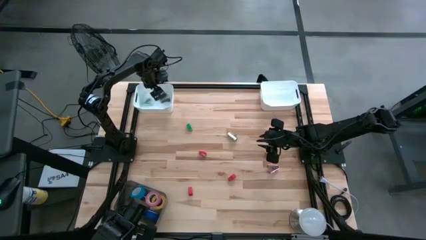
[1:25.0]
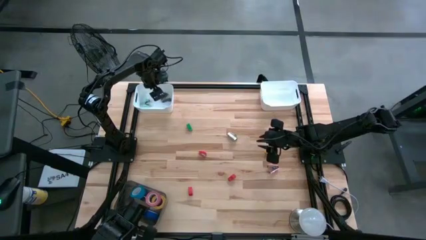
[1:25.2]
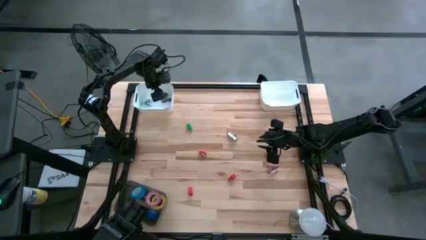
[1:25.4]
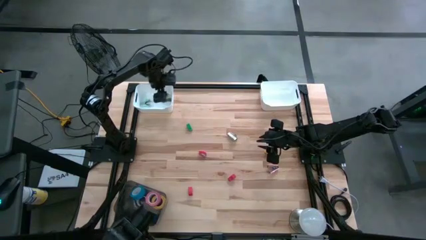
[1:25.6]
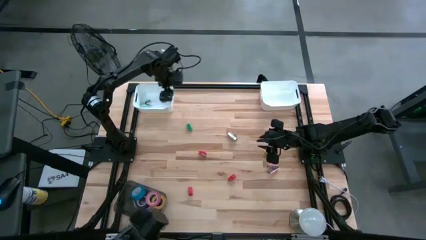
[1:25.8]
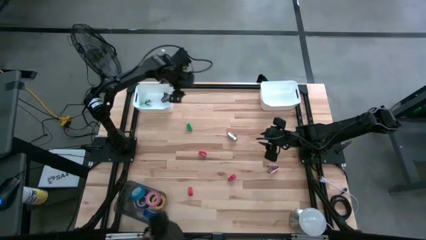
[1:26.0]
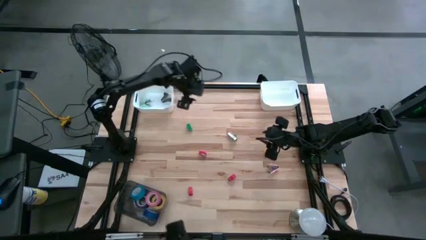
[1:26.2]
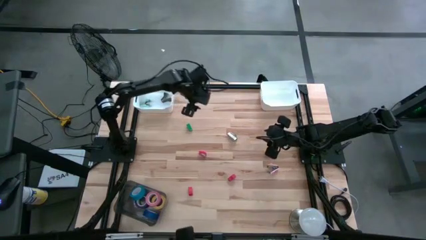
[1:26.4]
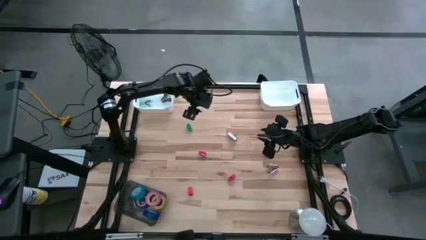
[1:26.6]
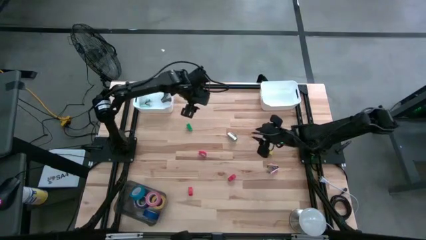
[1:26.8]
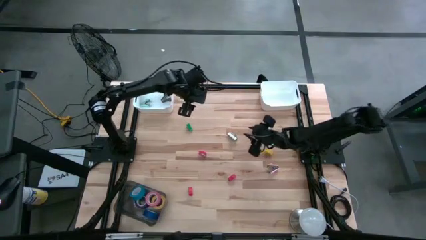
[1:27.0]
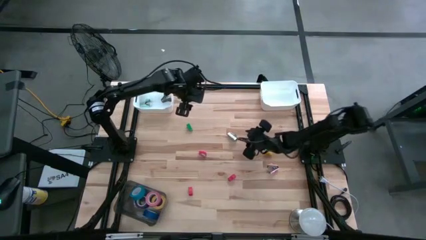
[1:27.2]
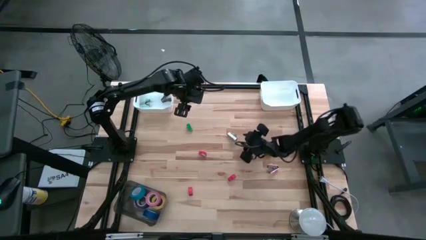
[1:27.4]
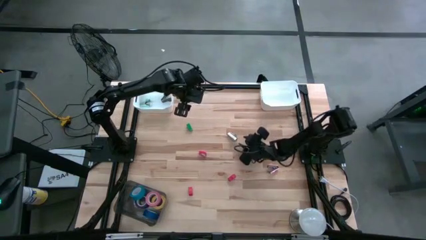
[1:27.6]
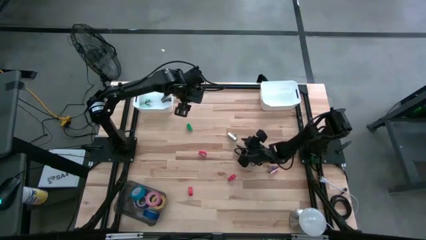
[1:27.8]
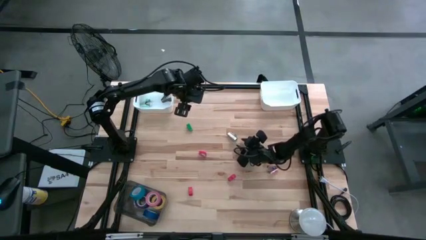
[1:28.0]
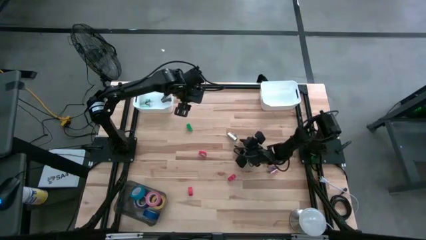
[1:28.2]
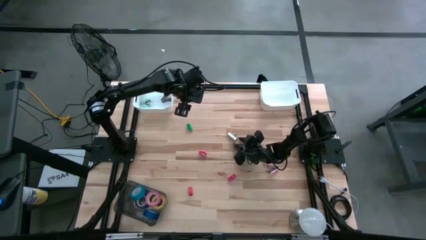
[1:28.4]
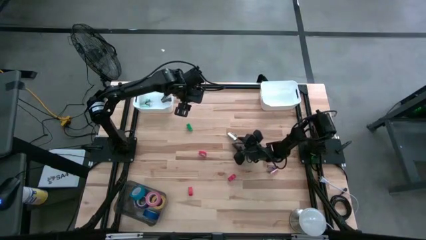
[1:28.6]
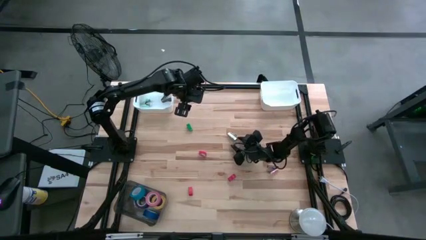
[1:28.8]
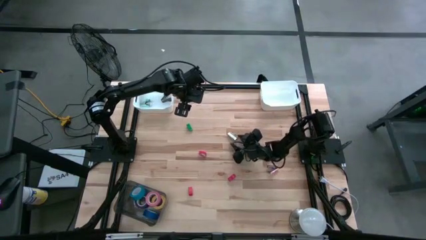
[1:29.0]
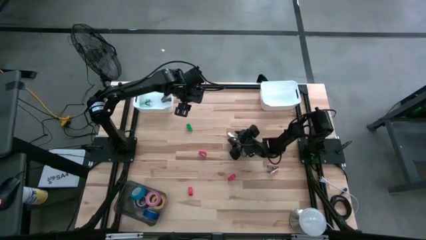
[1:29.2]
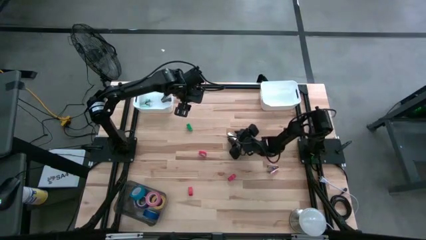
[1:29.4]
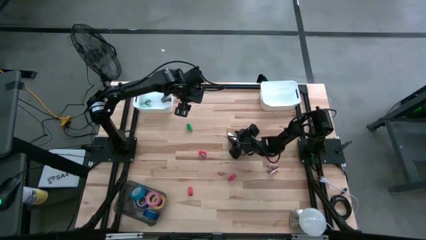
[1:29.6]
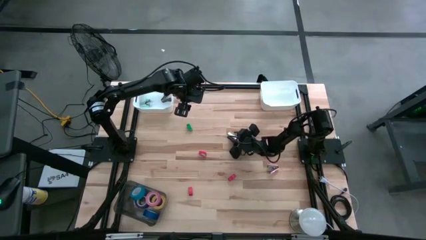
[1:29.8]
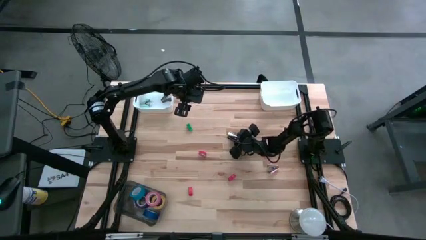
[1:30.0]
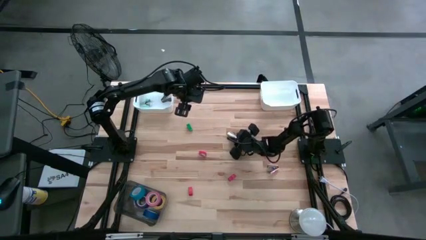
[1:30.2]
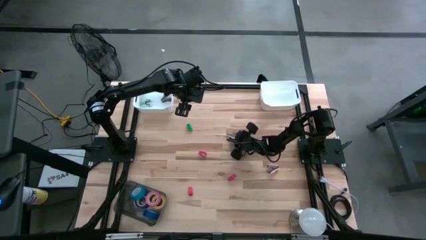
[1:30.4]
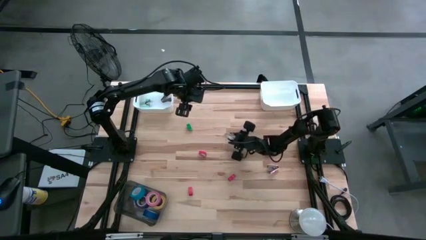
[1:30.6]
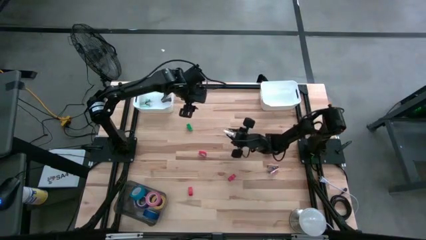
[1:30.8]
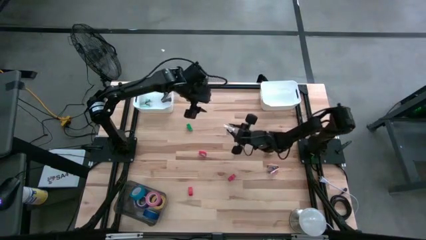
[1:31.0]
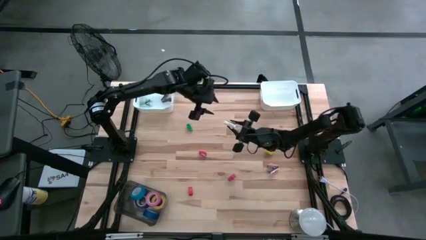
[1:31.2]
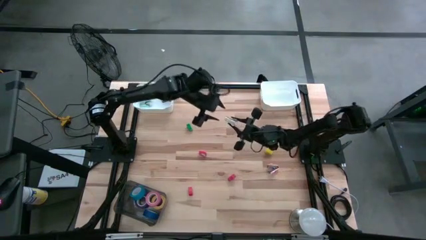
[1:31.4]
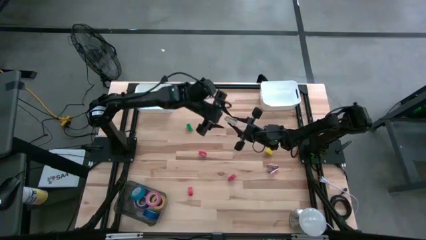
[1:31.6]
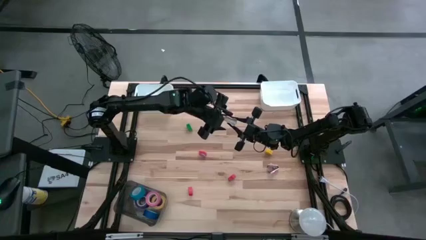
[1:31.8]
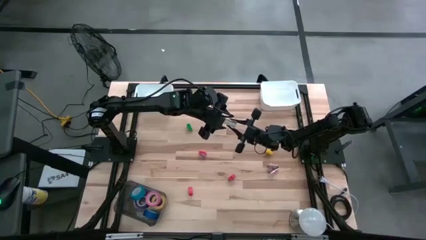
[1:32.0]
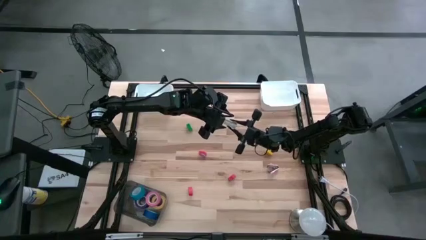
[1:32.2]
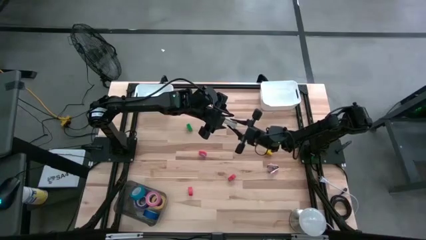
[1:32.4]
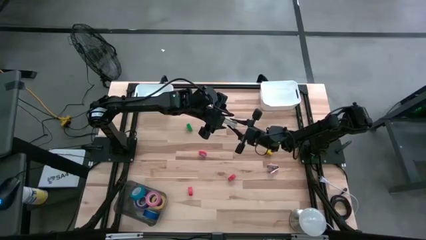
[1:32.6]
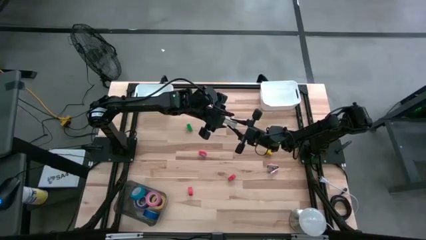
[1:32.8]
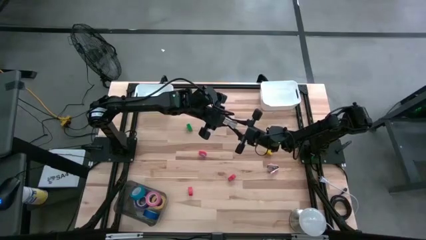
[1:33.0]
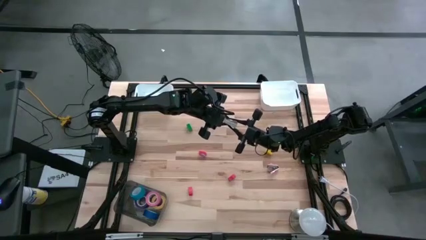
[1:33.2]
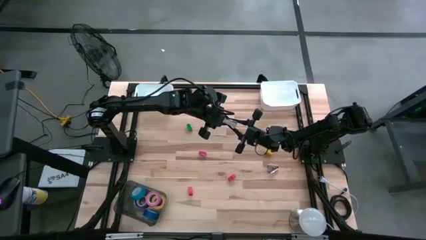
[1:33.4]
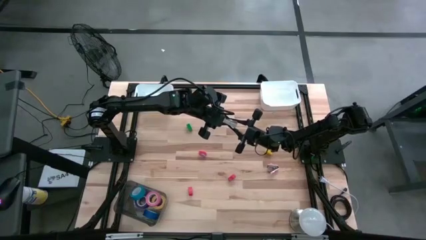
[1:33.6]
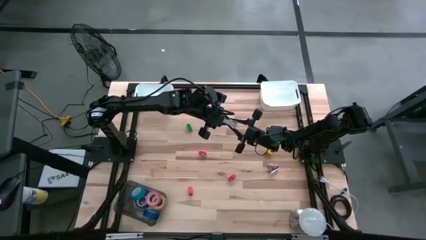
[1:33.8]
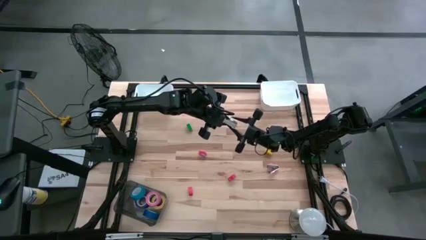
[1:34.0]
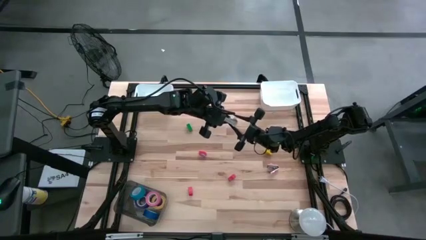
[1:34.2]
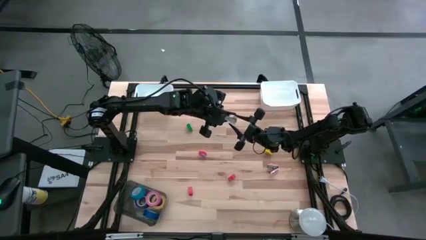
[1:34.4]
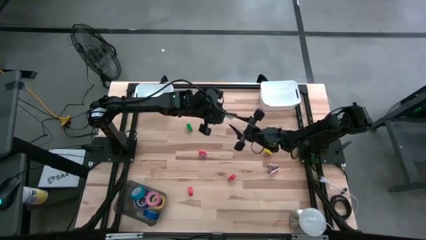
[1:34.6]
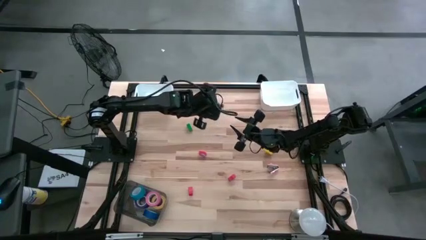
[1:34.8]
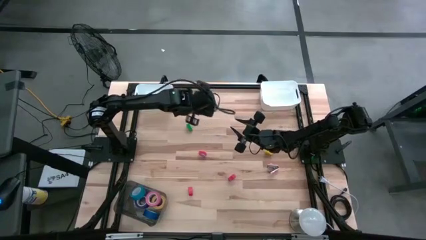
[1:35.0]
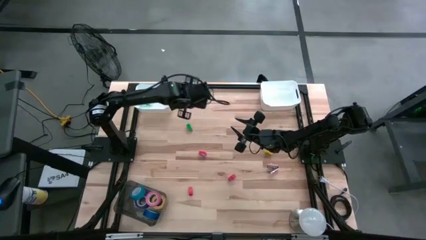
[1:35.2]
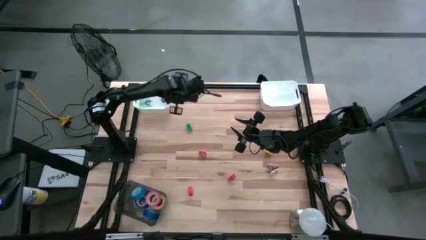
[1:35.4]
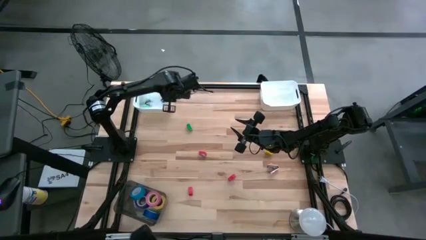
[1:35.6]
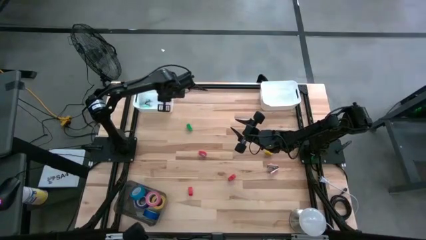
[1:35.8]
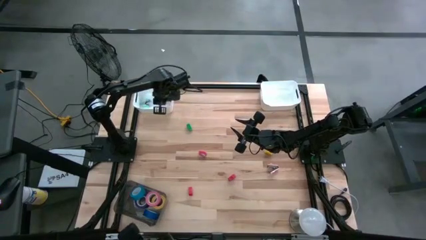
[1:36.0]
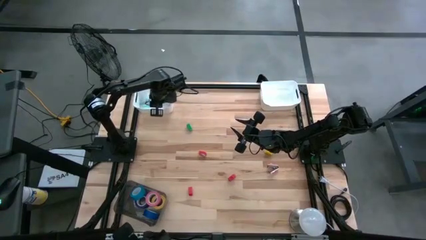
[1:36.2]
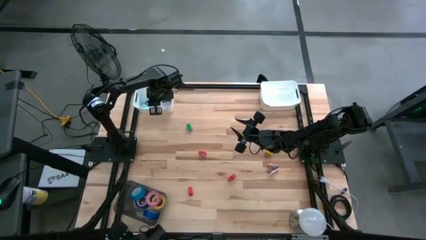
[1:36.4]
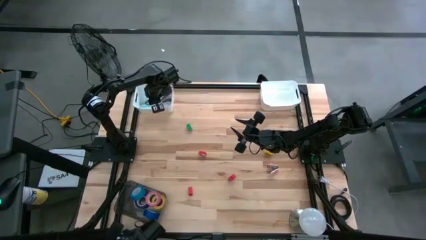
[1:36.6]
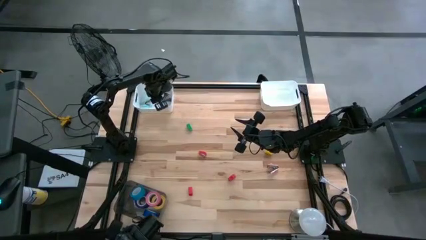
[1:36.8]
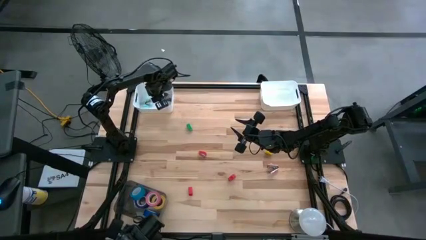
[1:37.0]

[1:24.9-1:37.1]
Task: Pick and place Stapler, Stapler remover, tape
Put the gray staple remover into the left white bin
